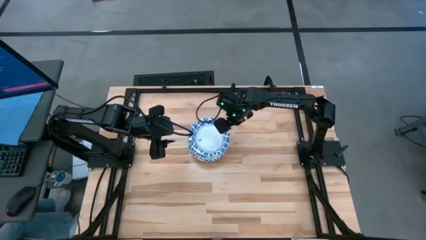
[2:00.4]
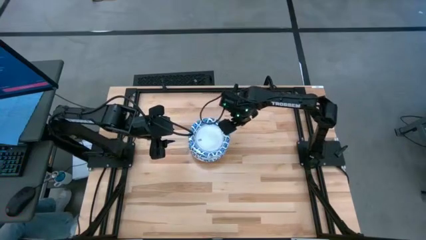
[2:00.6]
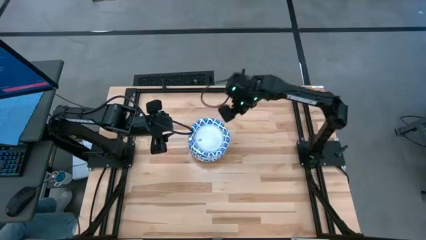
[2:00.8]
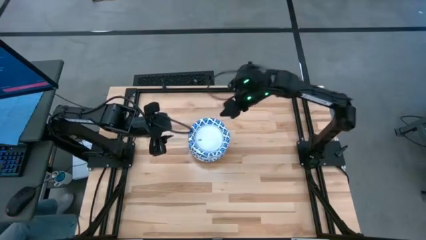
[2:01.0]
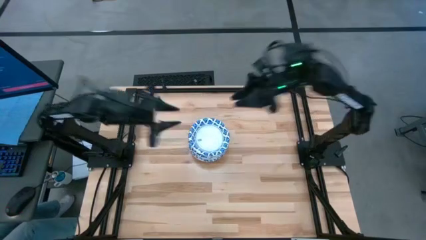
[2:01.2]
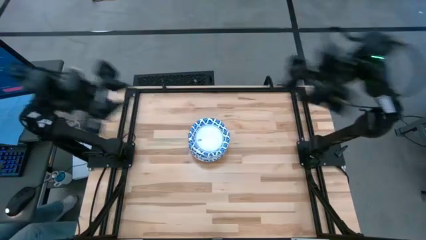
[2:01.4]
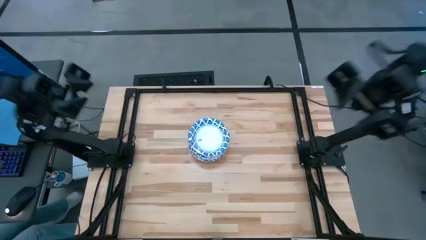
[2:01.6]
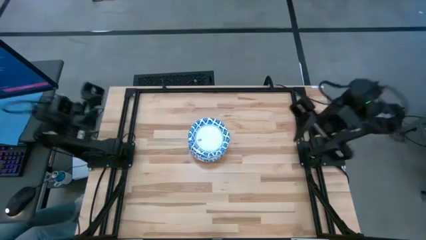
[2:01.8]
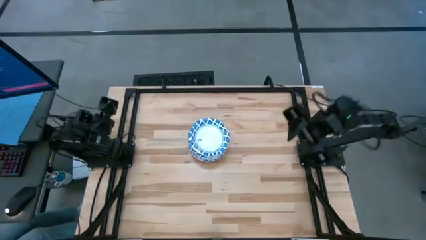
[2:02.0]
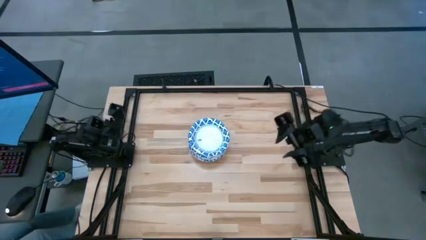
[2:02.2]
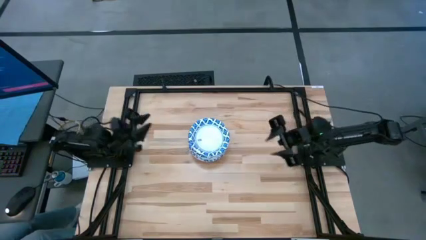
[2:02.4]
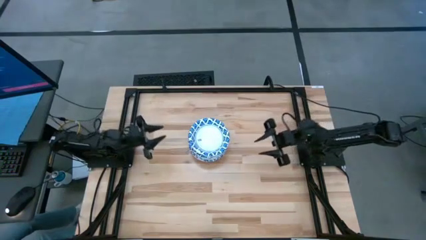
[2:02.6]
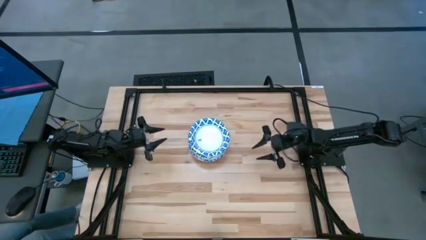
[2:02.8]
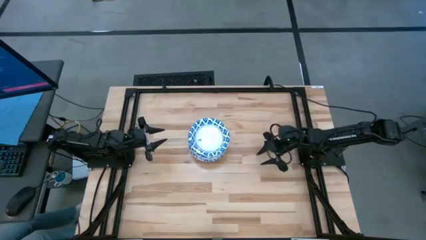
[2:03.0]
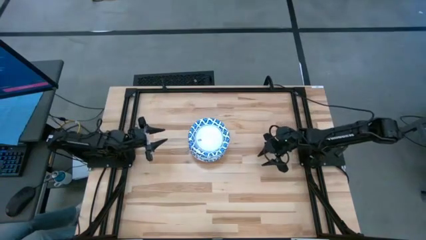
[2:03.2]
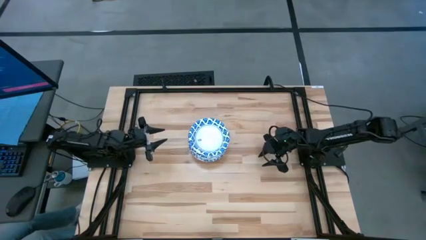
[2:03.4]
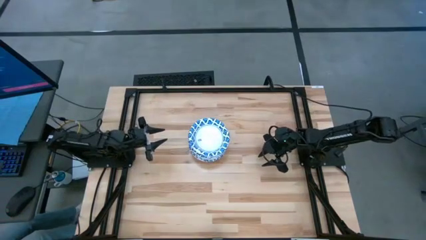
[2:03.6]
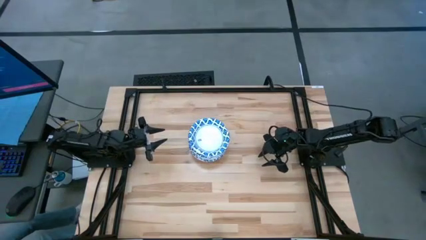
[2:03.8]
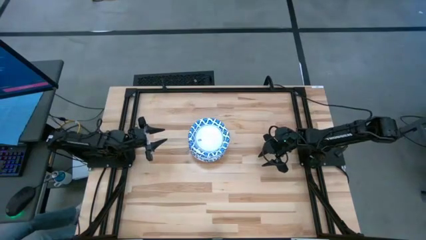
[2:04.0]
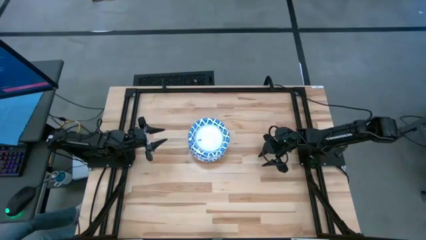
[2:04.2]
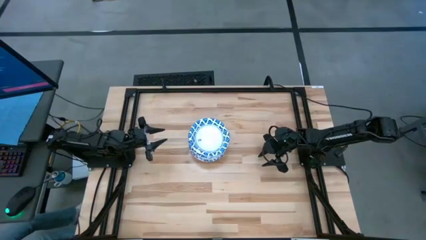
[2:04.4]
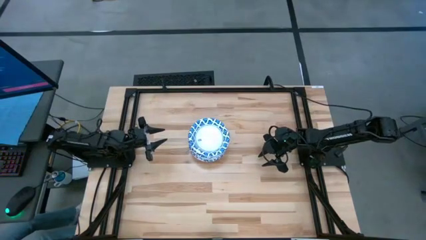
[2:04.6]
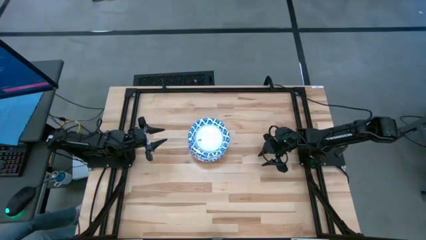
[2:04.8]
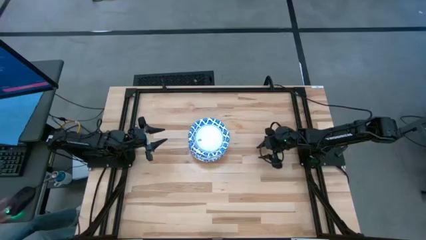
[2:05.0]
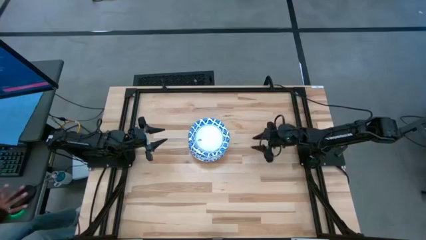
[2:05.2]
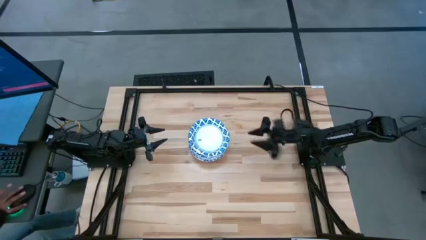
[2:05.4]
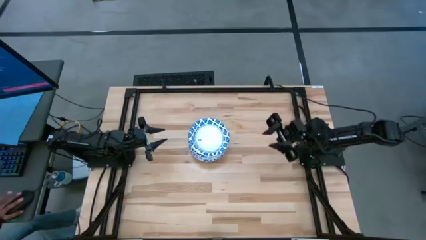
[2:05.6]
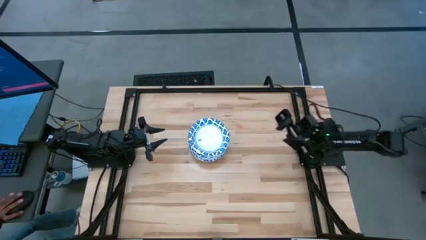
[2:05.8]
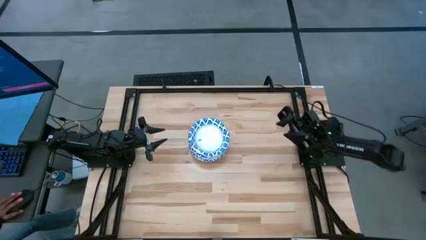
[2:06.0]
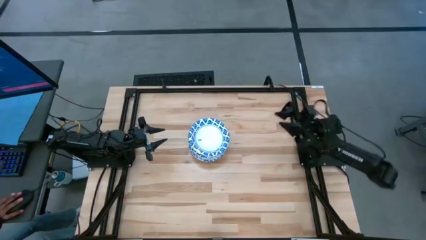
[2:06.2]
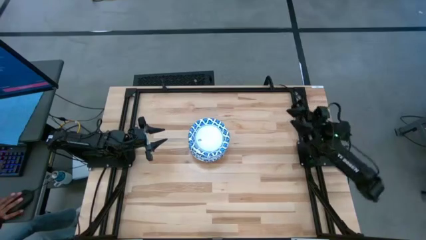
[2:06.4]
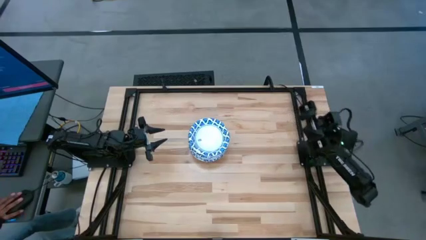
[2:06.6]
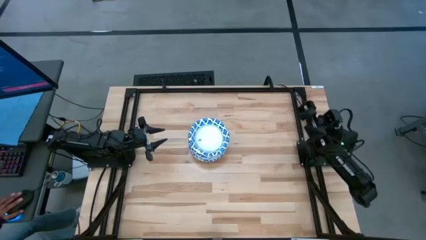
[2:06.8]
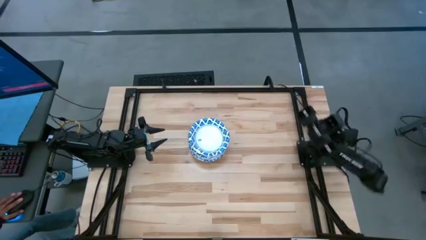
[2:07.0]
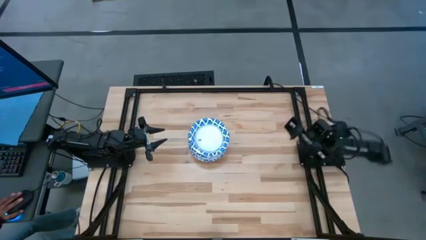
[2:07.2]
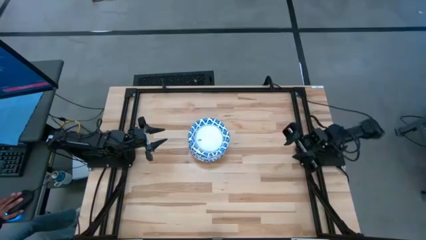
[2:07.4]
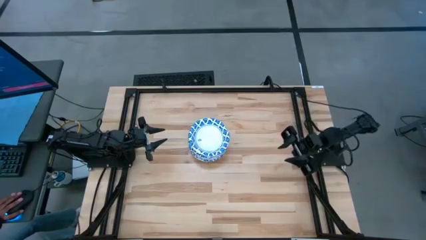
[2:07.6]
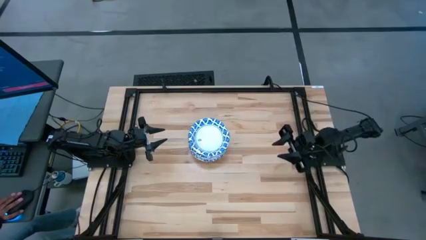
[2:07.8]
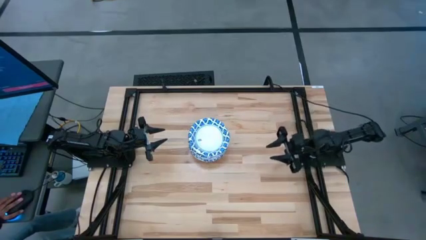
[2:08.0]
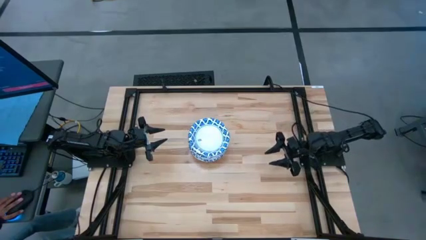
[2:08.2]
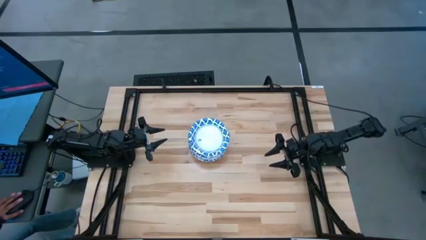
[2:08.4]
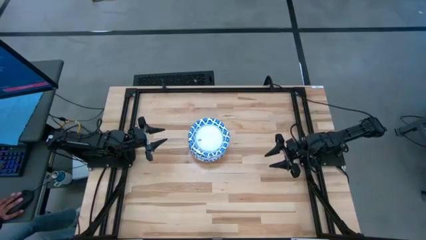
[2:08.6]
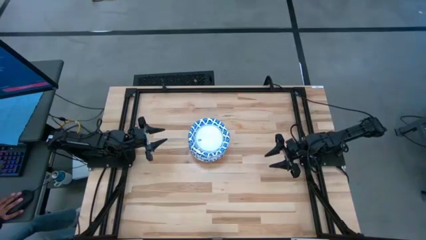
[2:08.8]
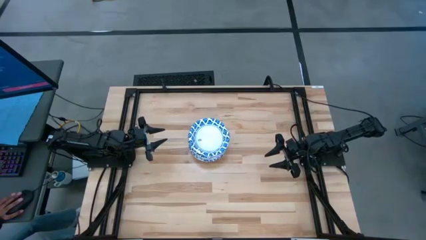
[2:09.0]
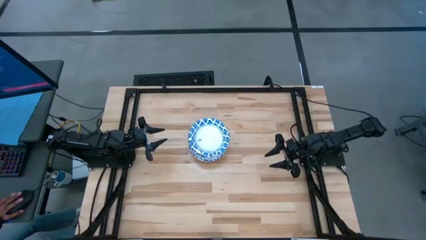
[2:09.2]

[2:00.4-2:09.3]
Task: Nest bowls inside each other
Return to Home Position
